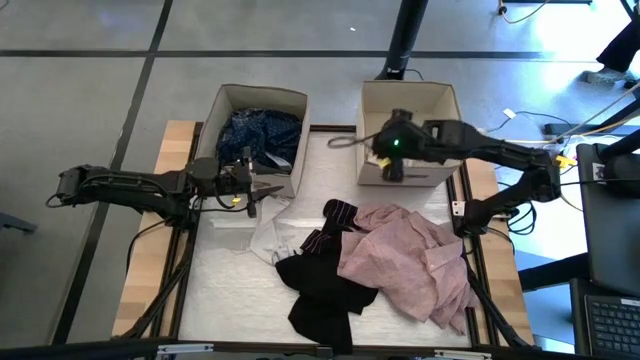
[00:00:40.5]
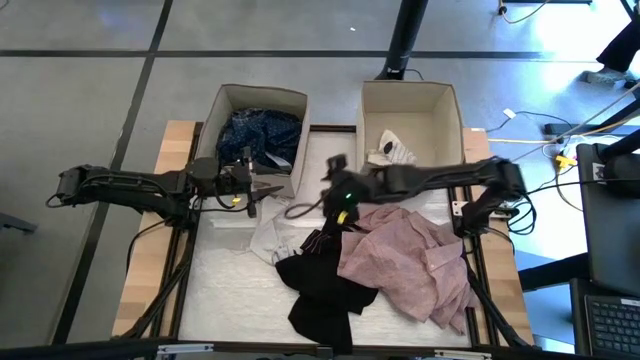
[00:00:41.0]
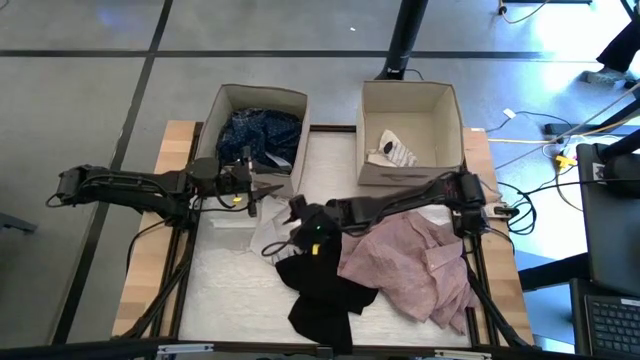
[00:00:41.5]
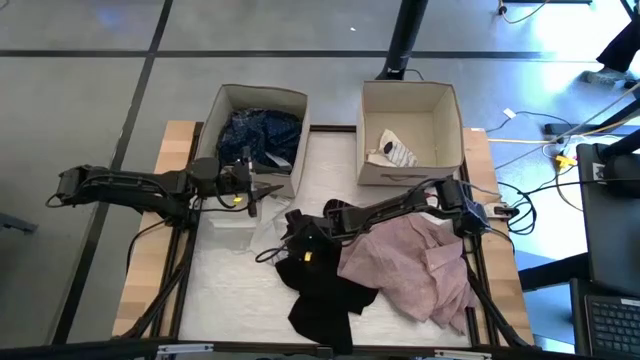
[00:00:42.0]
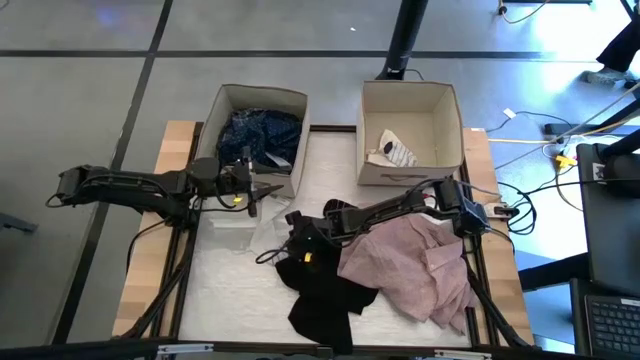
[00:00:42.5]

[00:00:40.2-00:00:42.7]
Task: Sort clothes
Put the white patterned sock into the right laundry organizer

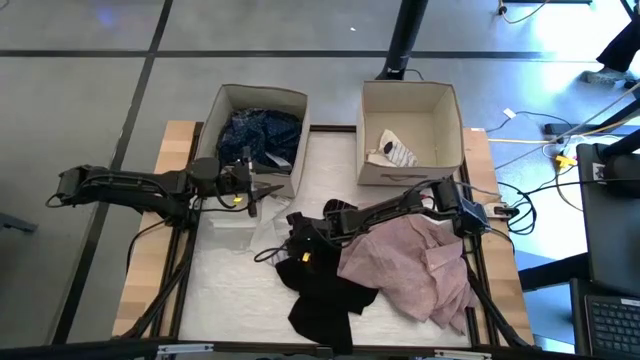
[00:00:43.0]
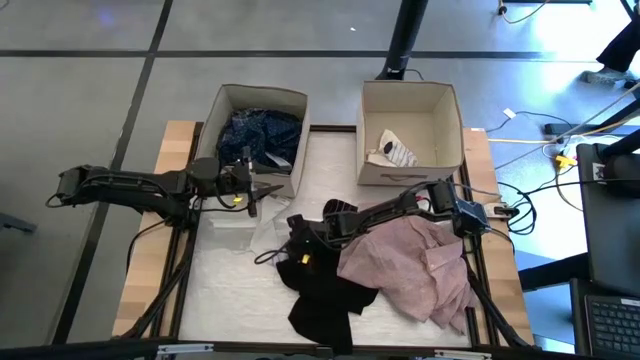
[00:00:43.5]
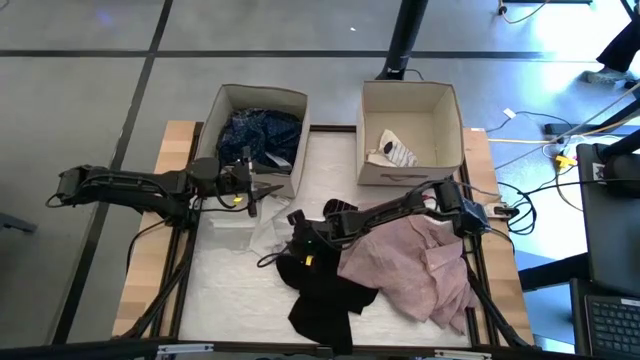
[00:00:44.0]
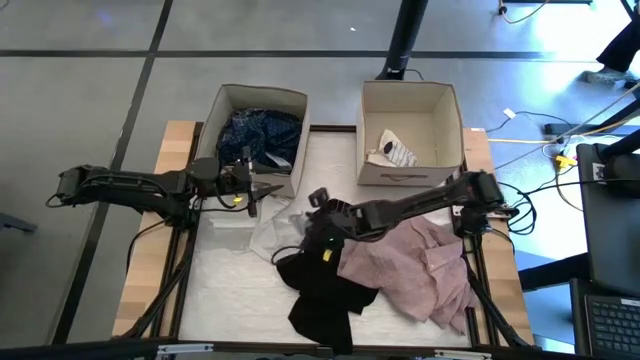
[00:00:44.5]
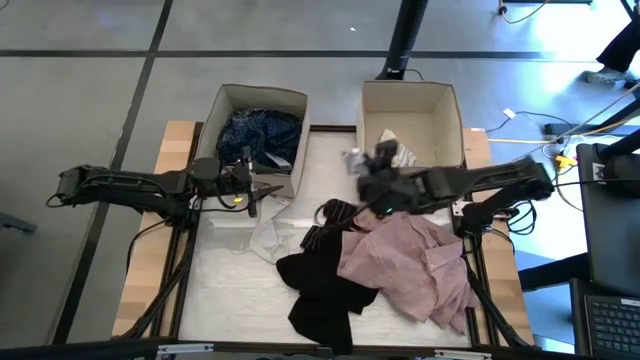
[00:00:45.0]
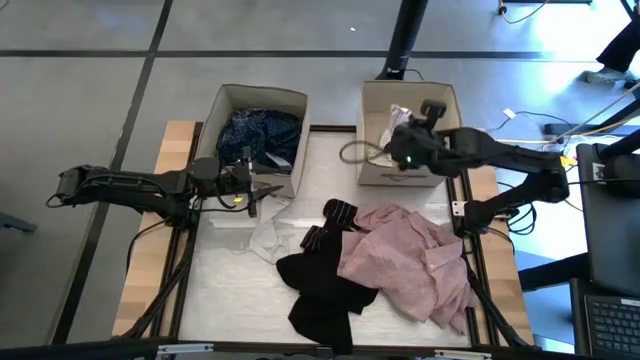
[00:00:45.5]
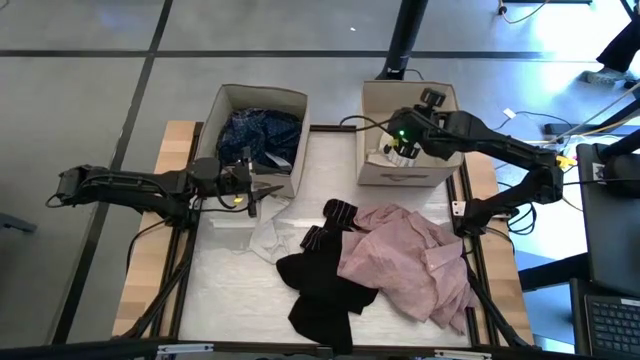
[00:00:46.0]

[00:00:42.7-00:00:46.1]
Put the white patterned sock into the right laundry organizer

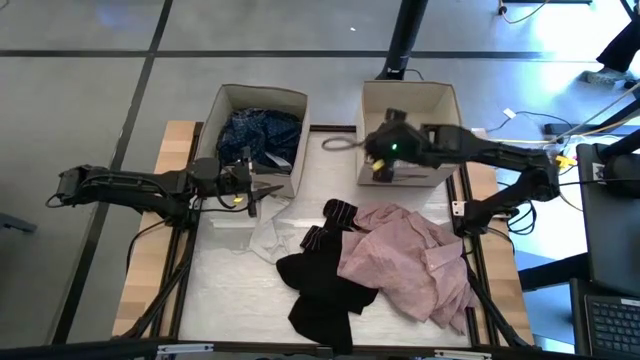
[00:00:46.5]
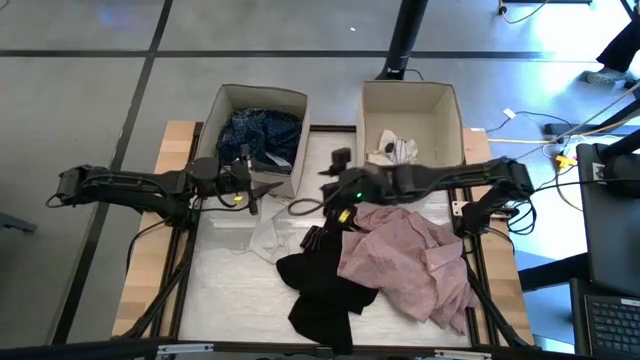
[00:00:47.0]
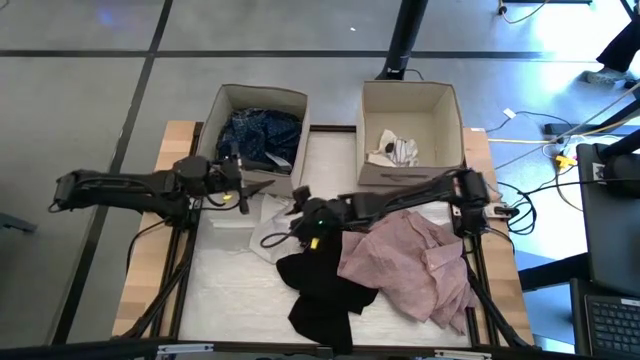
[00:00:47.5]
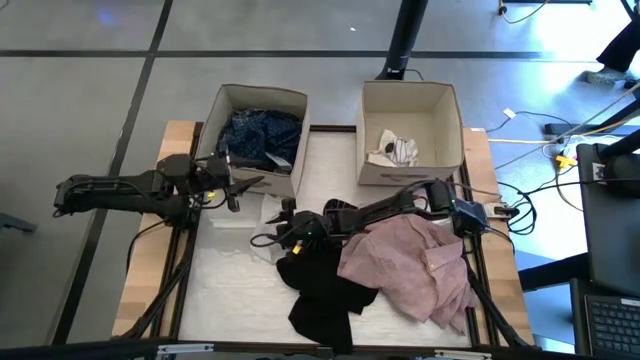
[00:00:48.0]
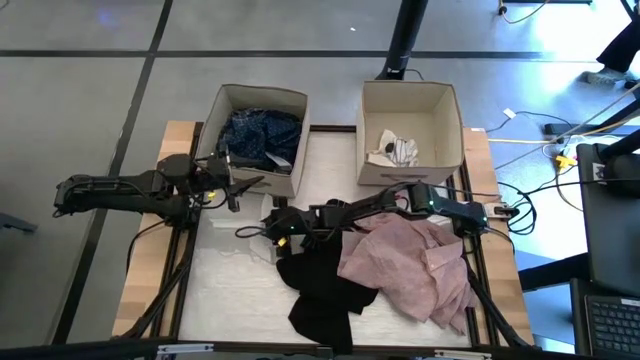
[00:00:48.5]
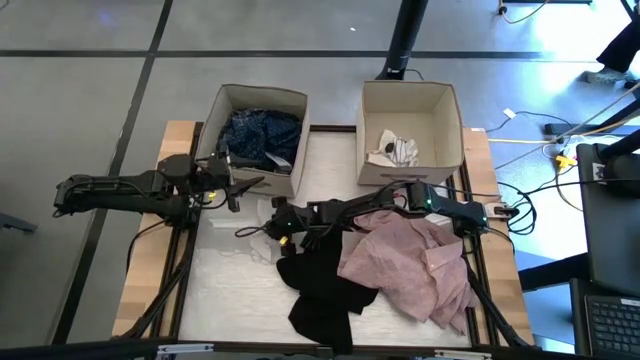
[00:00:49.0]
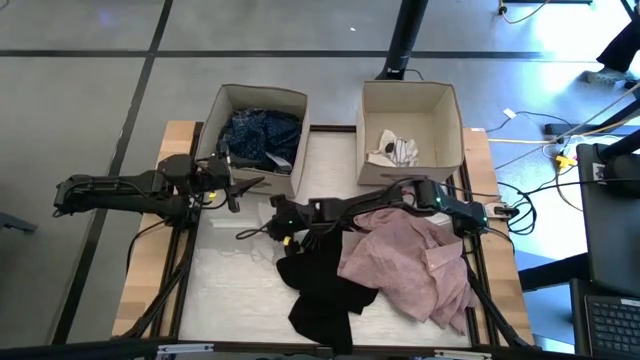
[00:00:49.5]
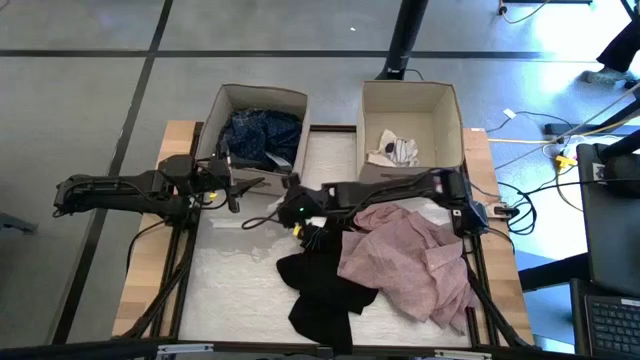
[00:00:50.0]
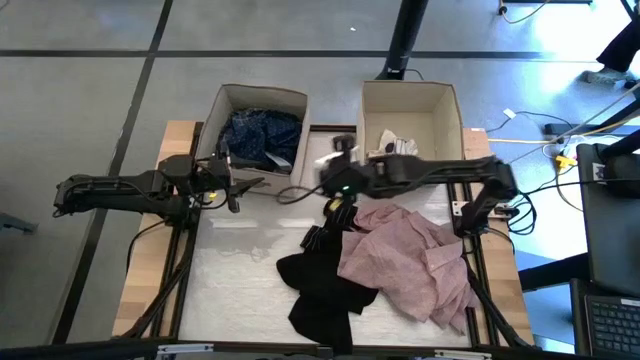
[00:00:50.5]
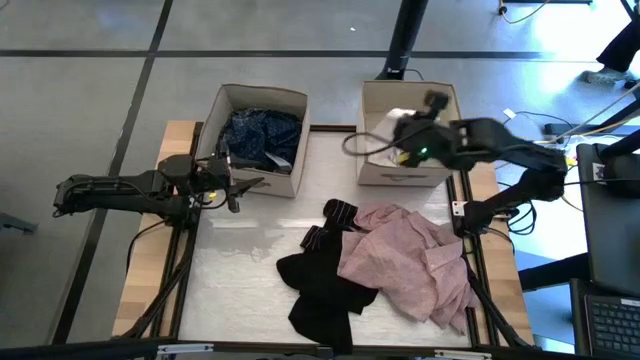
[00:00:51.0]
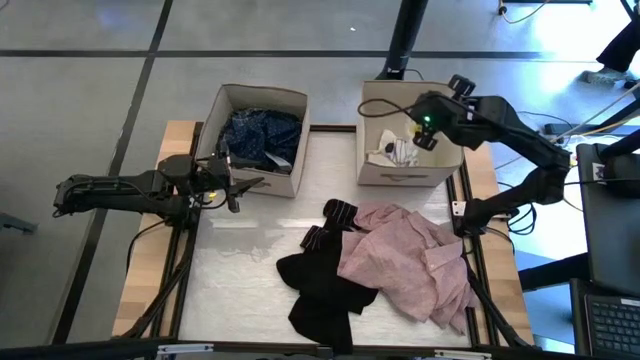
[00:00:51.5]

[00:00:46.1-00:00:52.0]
Put the white sock into the right laundry organizer

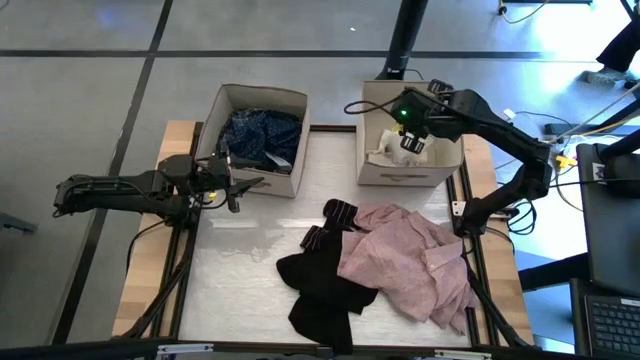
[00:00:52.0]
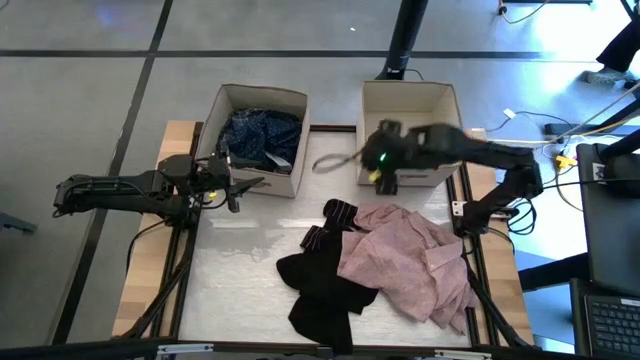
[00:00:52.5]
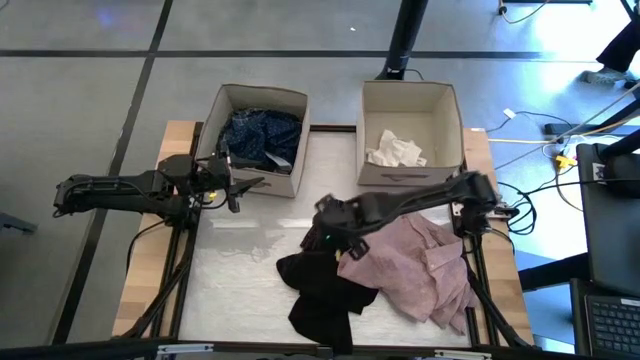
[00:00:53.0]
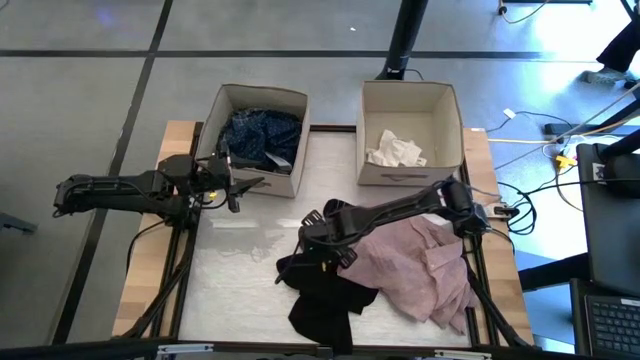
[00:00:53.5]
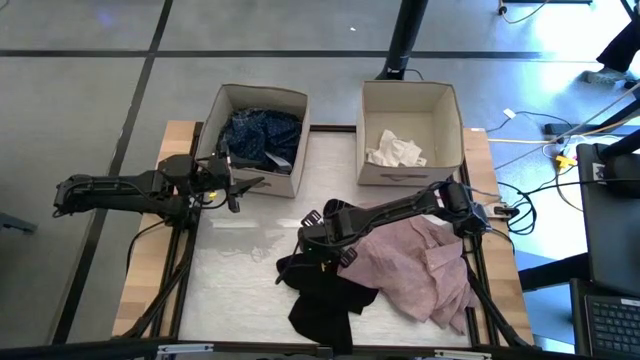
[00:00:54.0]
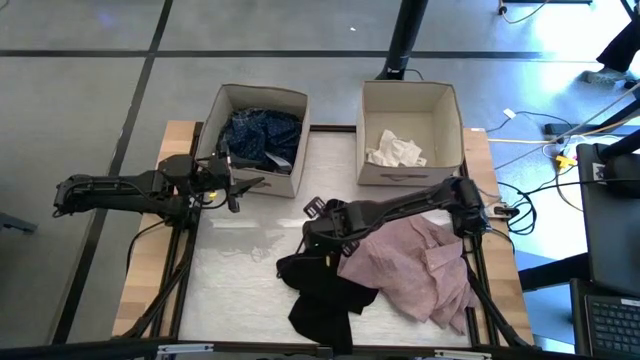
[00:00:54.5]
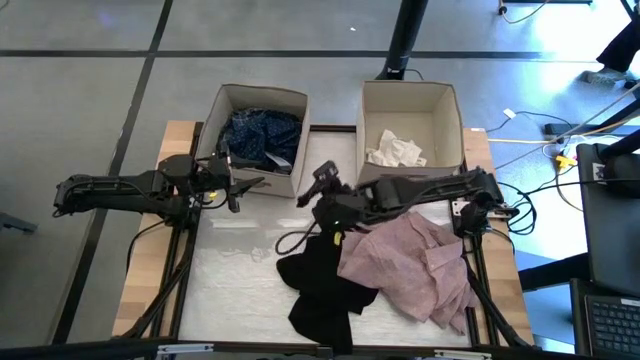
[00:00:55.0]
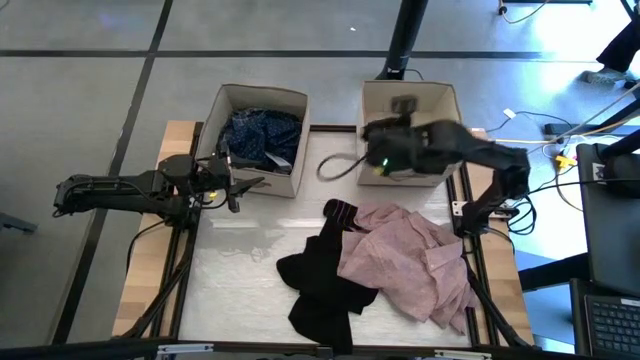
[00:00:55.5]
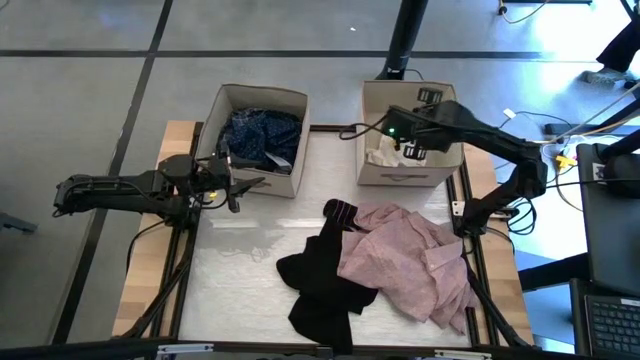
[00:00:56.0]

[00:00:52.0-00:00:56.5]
Put the black sock into the right laundry organizer

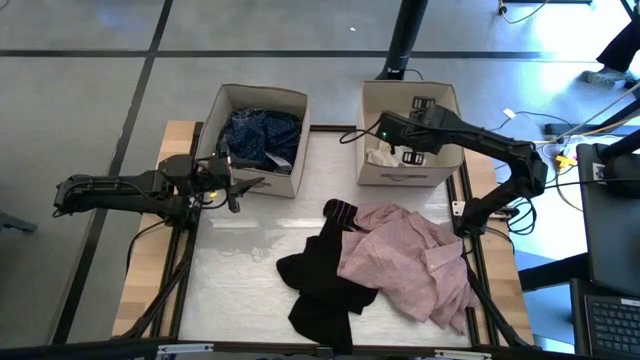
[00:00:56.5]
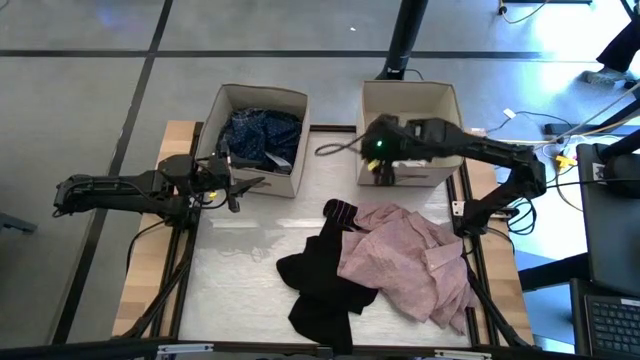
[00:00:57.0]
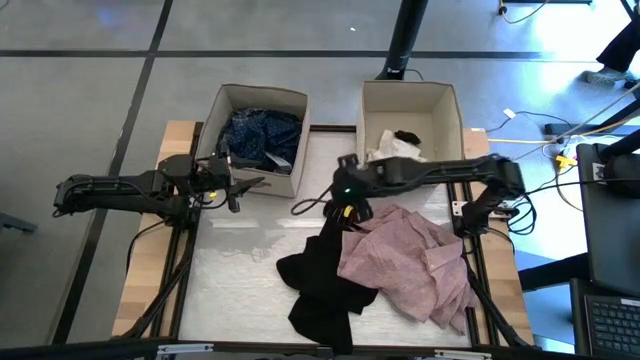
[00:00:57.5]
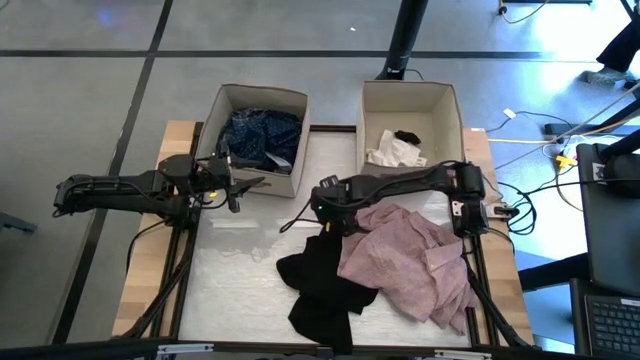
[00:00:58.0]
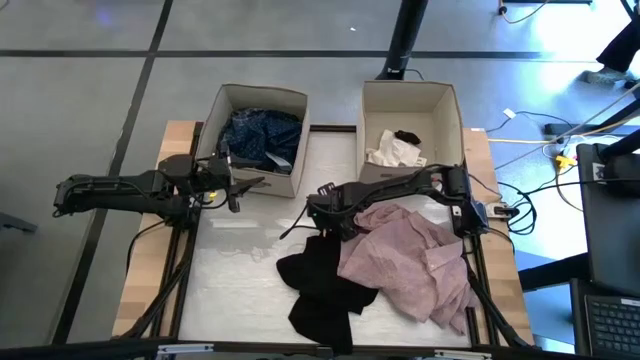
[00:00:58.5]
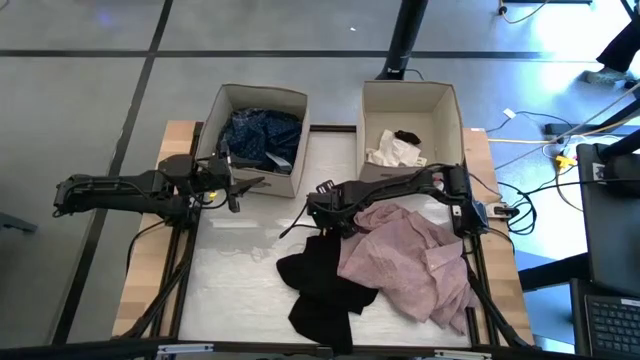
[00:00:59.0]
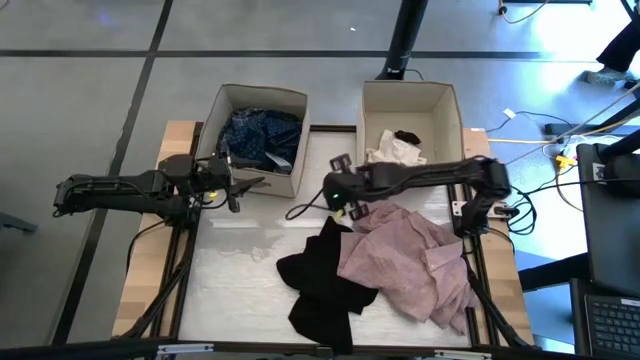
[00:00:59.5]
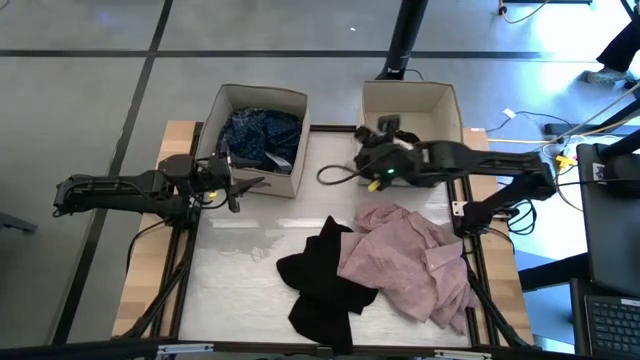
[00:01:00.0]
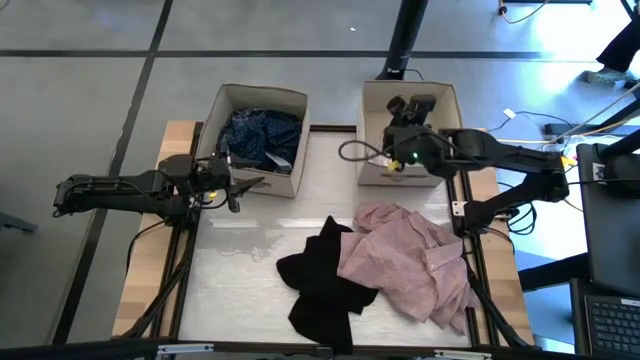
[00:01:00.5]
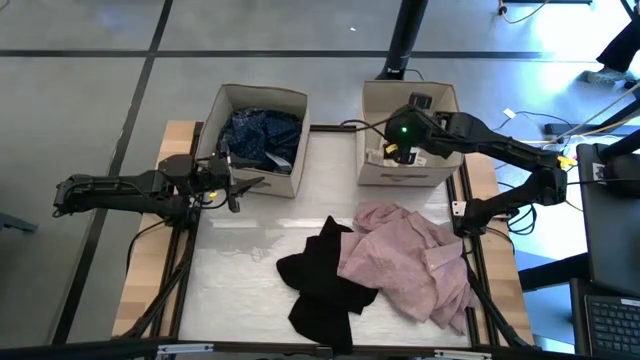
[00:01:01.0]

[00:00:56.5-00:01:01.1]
Put the black sock into the right laundry organizer
